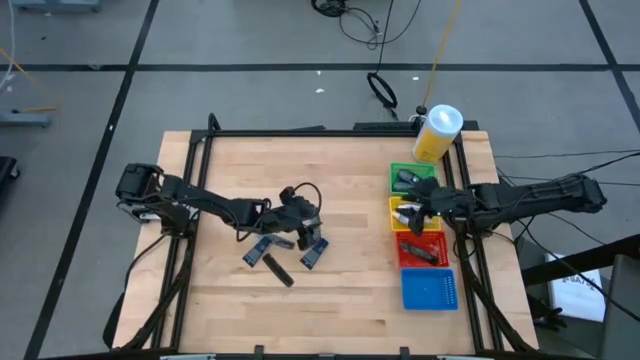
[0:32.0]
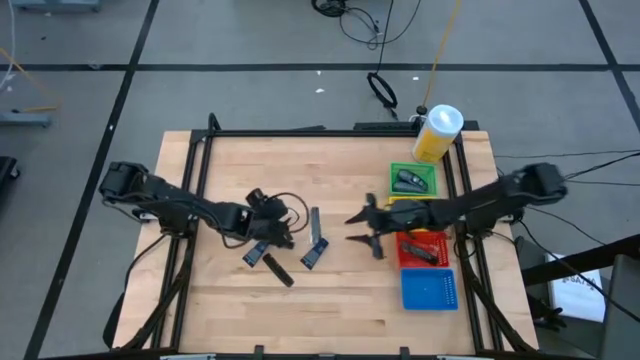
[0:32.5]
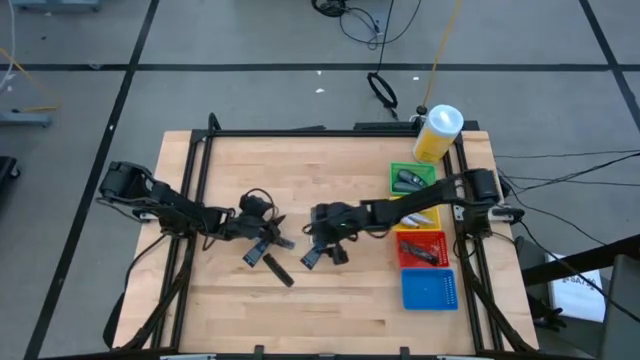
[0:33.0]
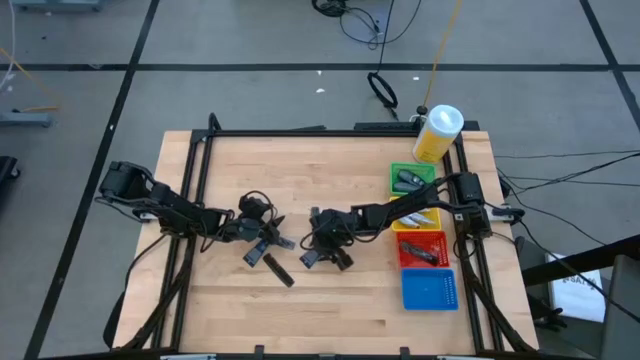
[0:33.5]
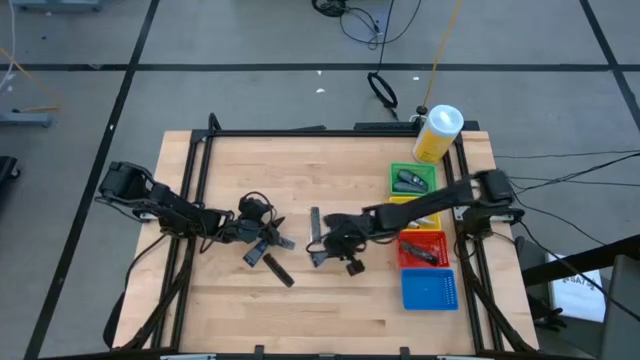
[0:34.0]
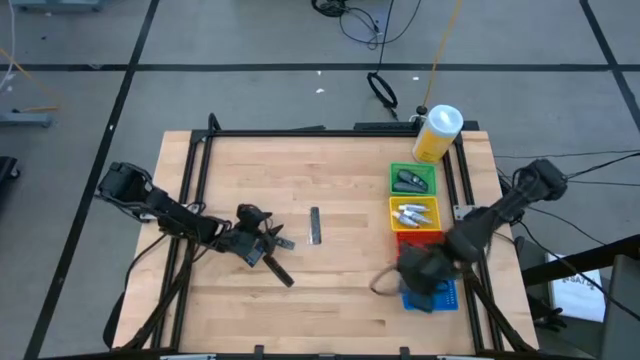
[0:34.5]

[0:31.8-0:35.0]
Task: Pick & Place Travel size toiletries
Put the blue shave cream into the blue basket

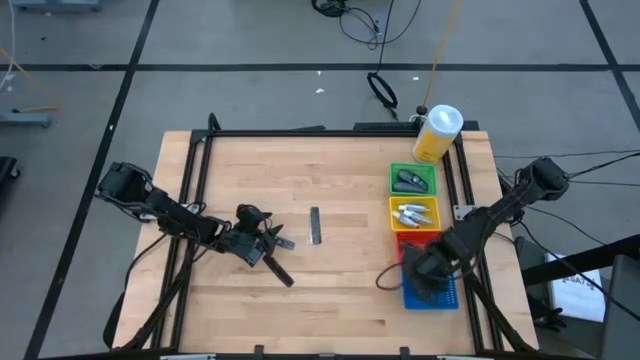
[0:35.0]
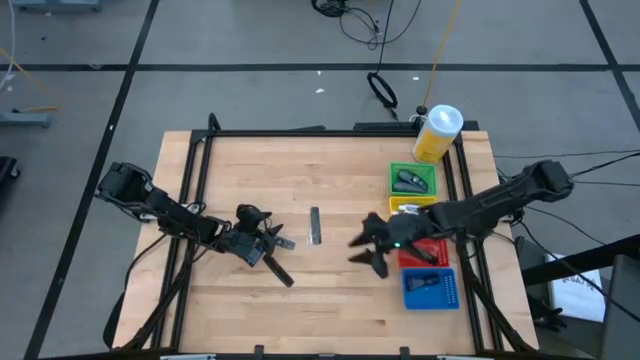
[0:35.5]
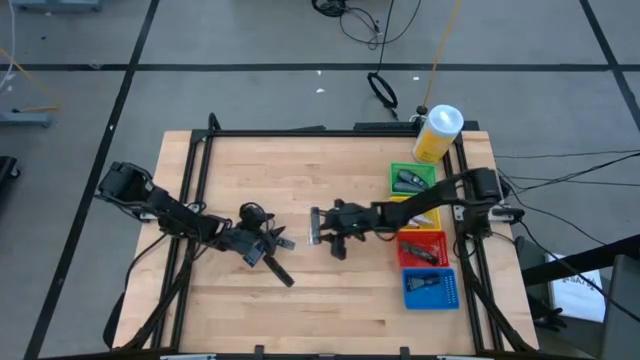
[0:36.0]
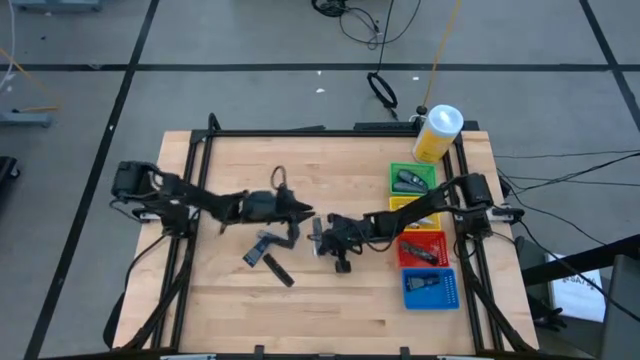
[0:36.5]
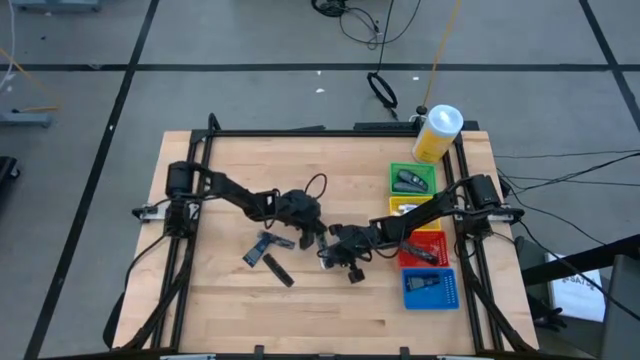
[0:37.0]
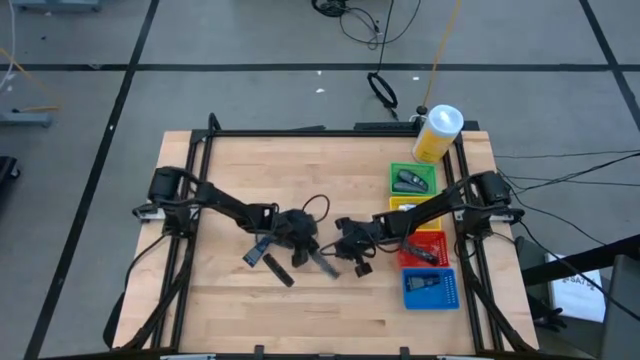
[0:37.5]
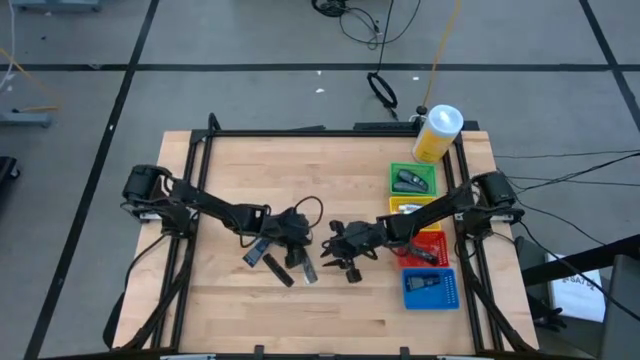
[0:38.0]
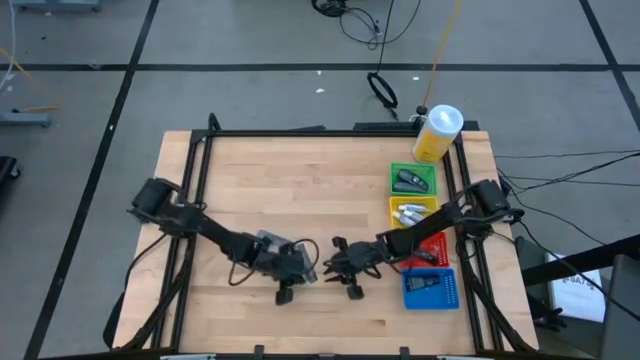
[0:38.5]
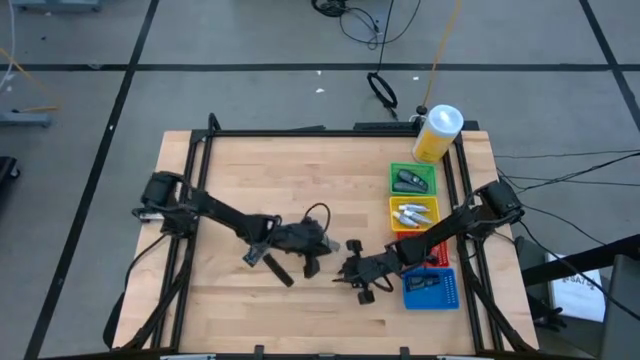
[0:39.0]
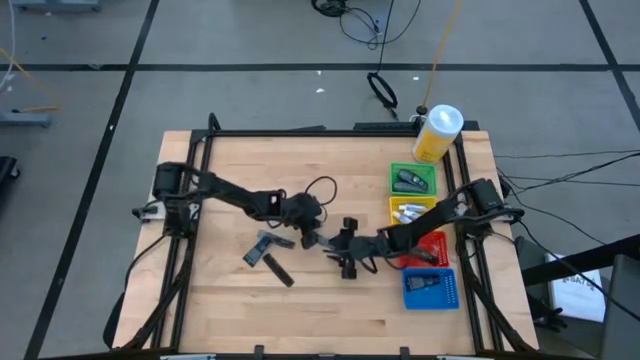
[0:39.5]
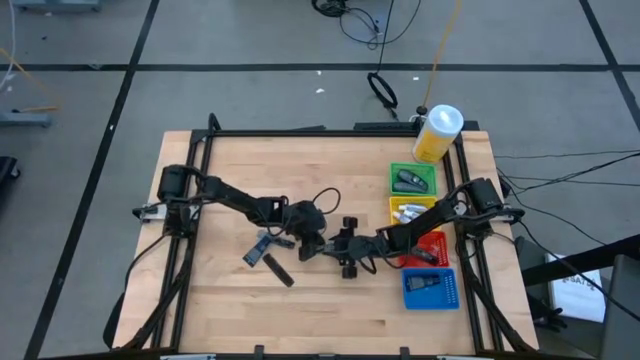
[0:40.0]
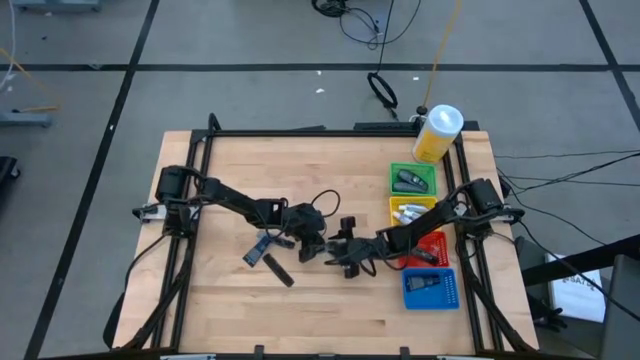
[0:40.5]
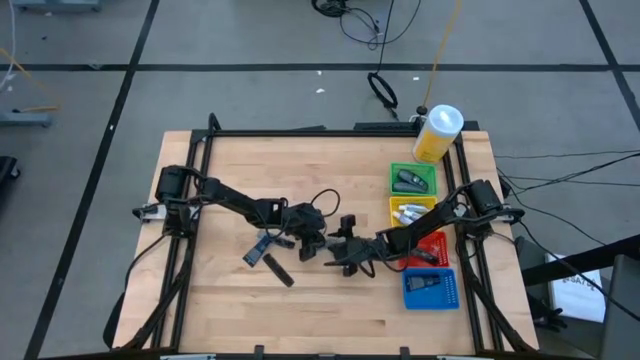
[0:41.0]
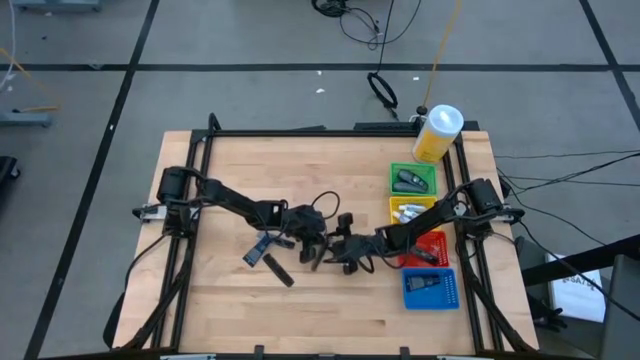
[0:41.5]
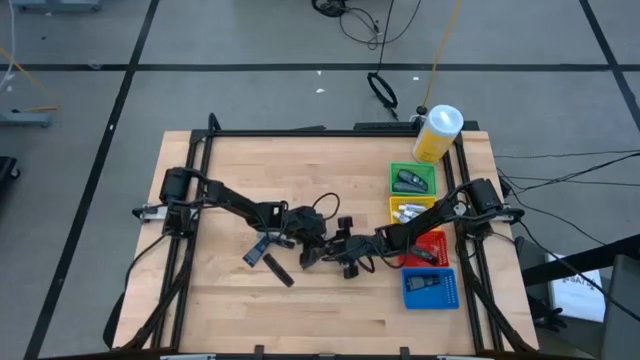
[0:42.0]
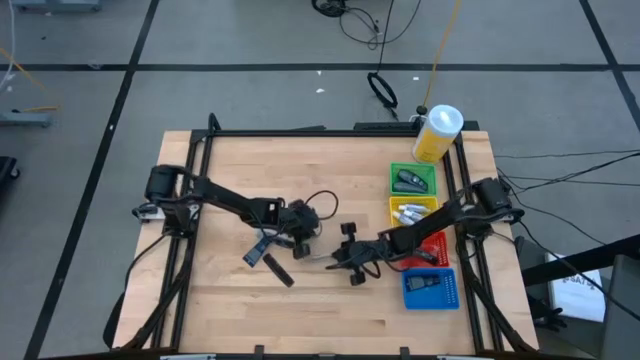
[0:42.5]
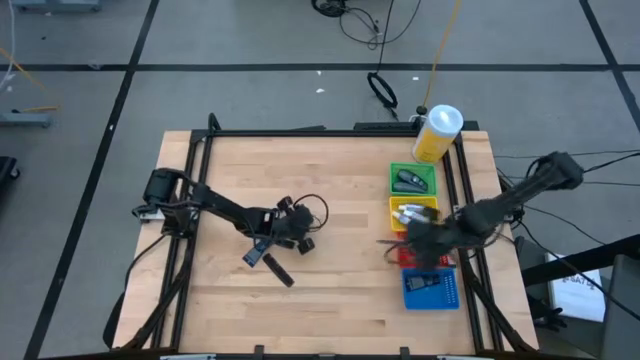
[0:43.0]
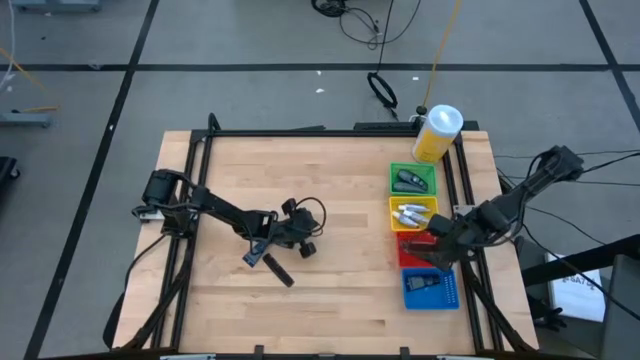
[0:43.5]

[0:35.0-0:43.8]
Put the black comb into the red basket

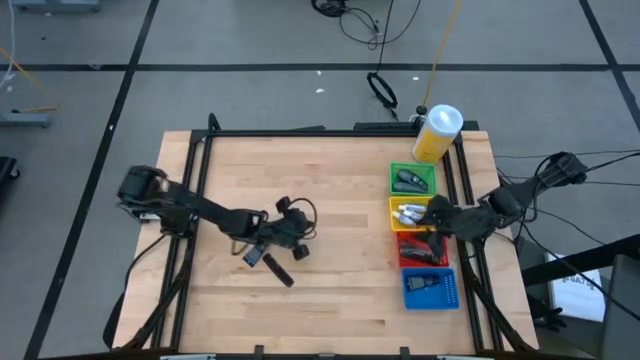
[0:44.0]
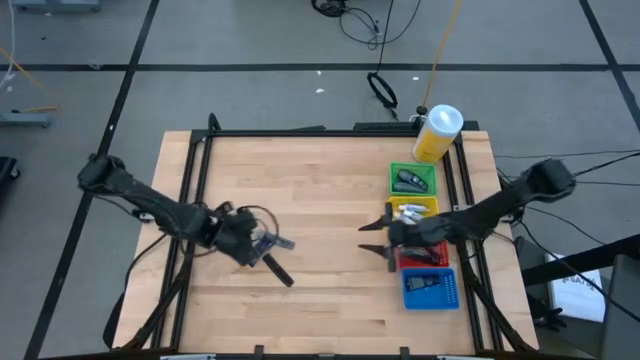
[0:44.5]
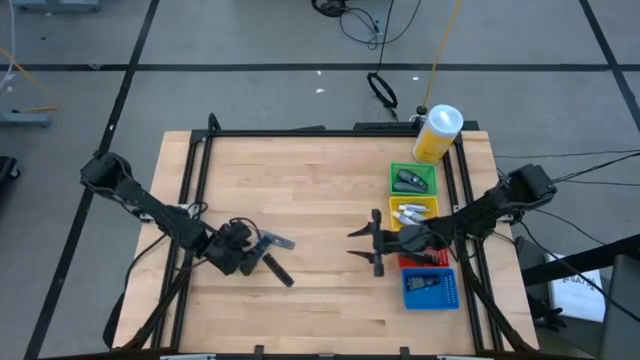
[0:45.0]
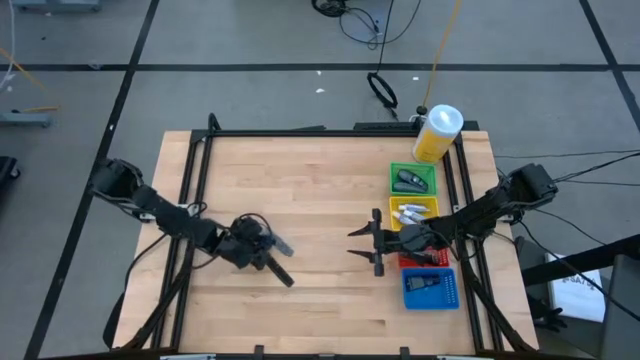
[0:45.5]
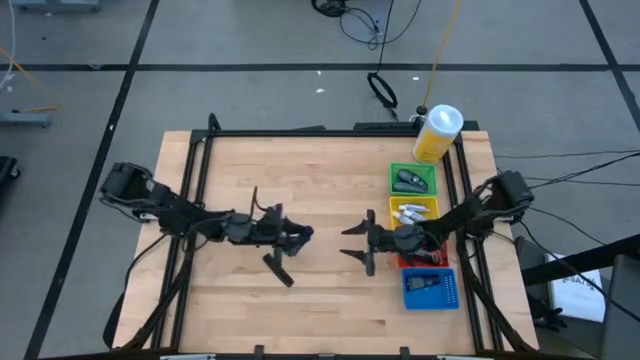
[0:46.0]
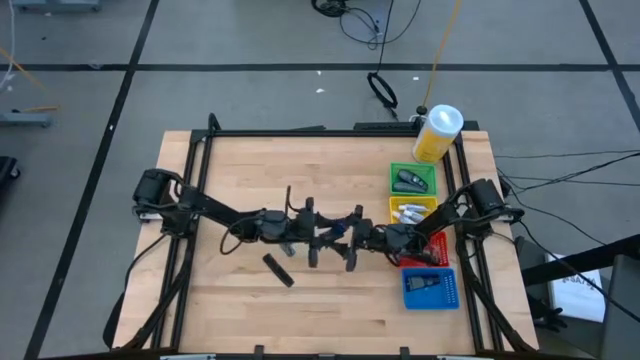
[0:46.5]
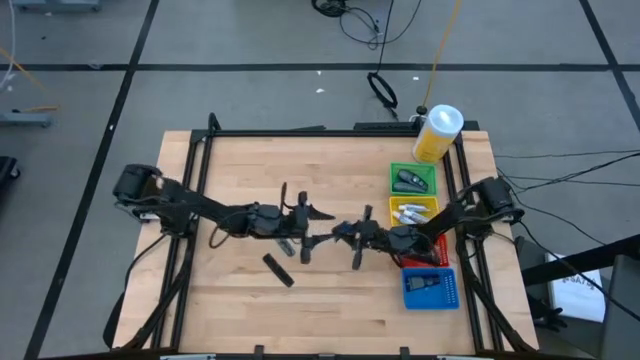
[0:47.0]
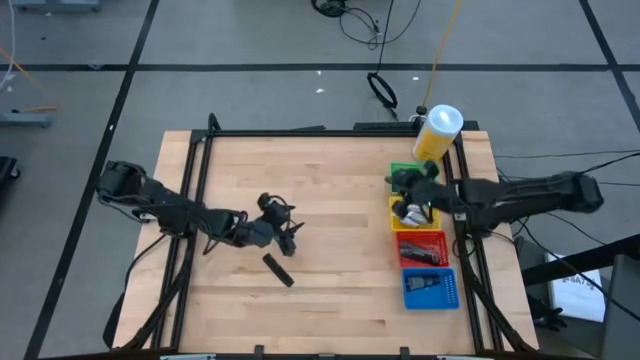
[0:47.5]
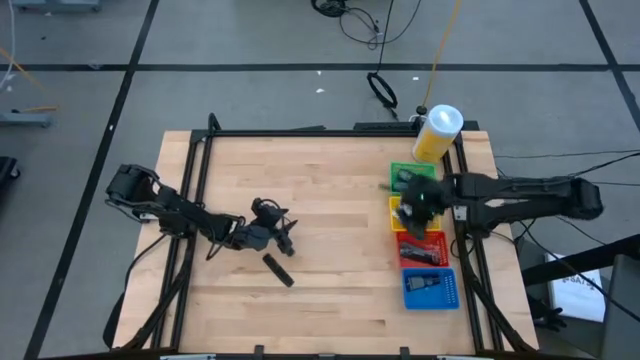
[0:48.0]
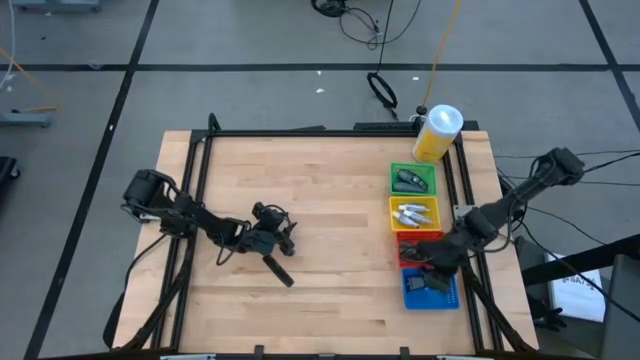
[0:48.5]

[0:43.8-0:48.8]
Put the blue shave cream into the blue basket

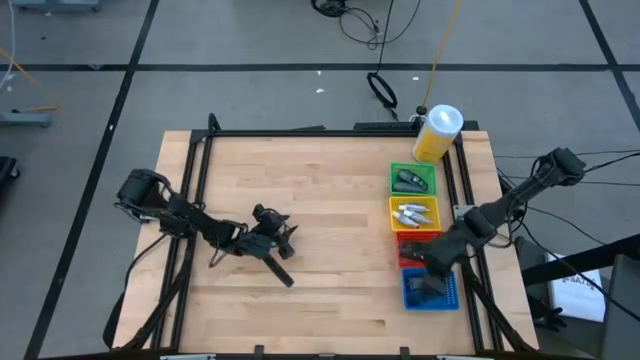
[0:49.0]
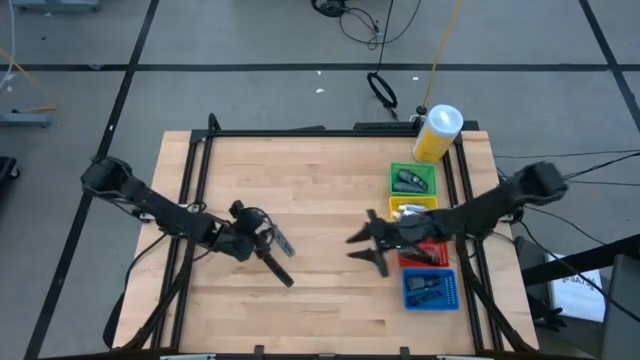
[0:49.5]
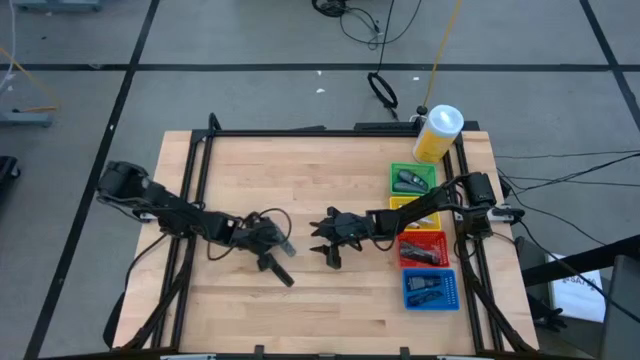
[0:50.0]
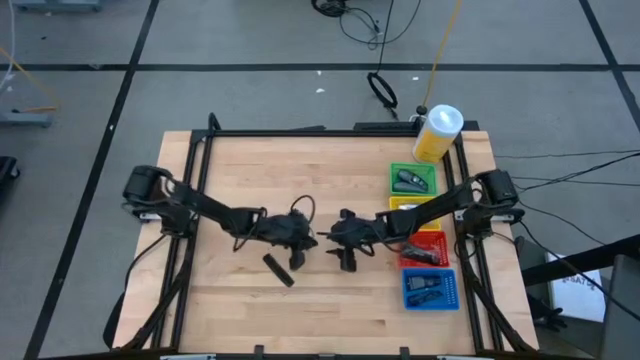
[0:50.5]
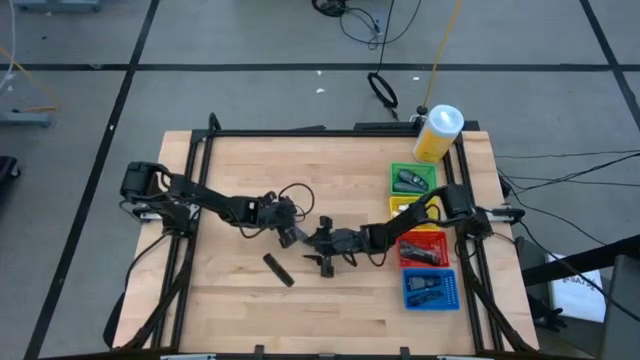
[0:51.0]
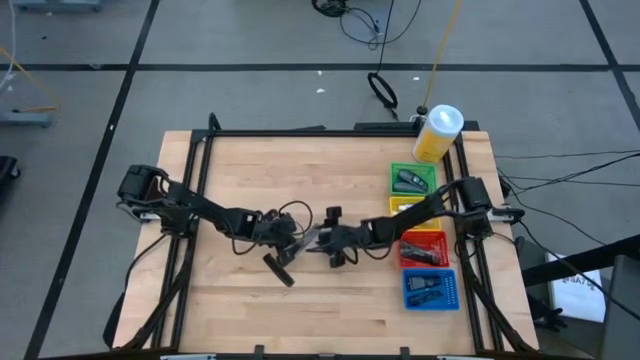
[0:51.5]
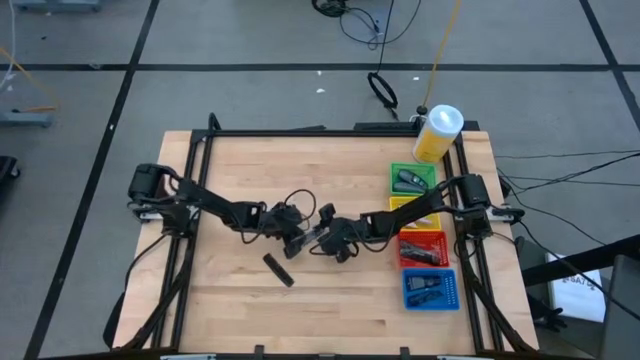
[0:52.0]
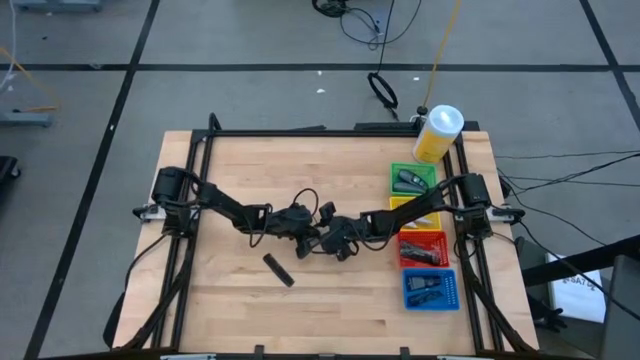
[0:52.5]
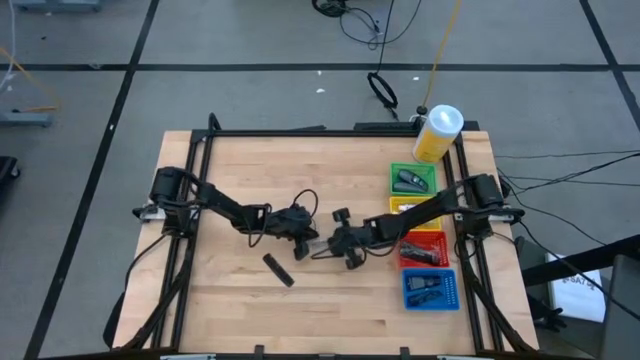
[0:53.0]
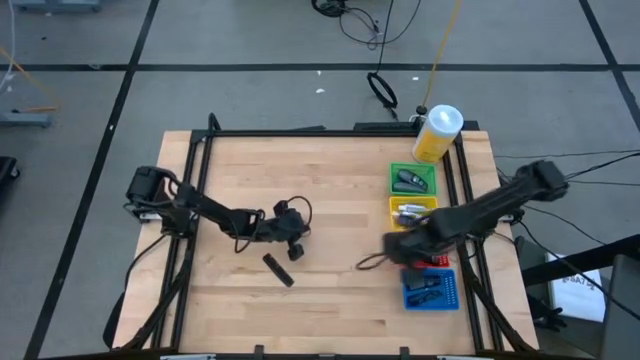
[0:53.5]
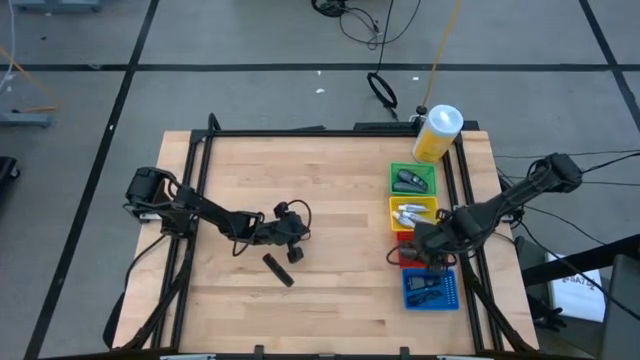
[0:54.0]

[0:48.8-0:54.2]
Put the black comb into the red basket
